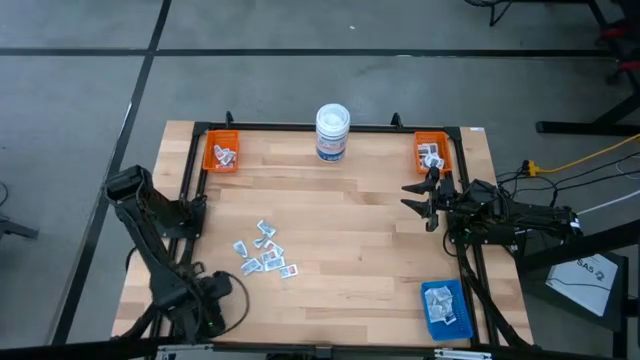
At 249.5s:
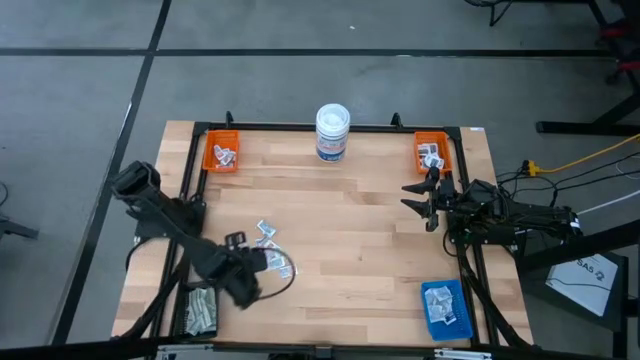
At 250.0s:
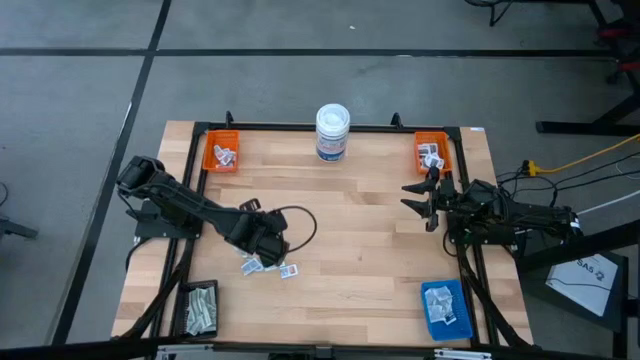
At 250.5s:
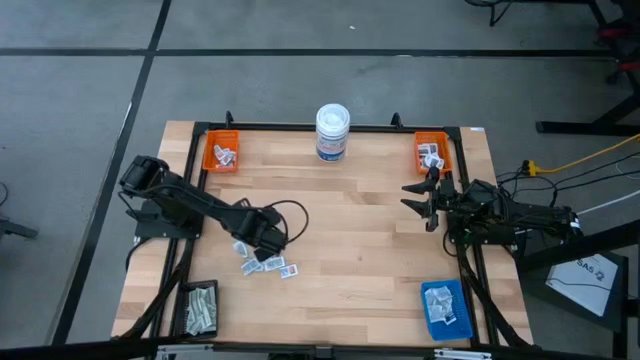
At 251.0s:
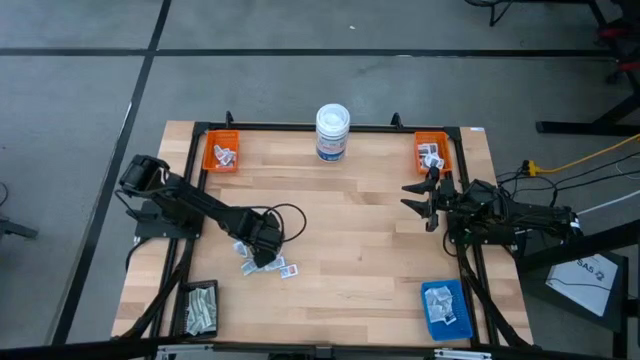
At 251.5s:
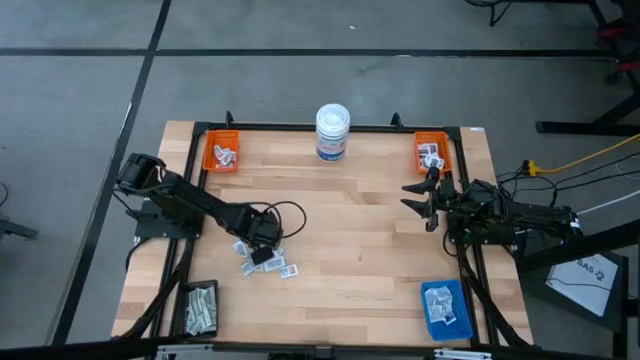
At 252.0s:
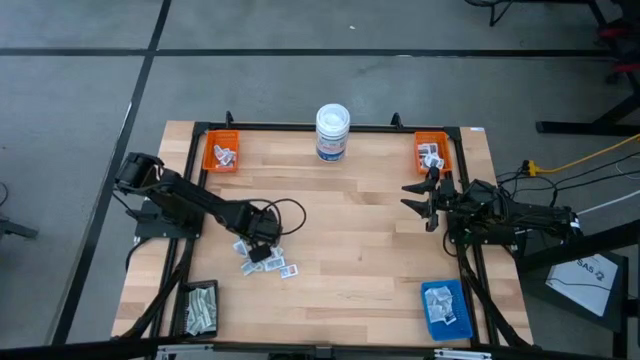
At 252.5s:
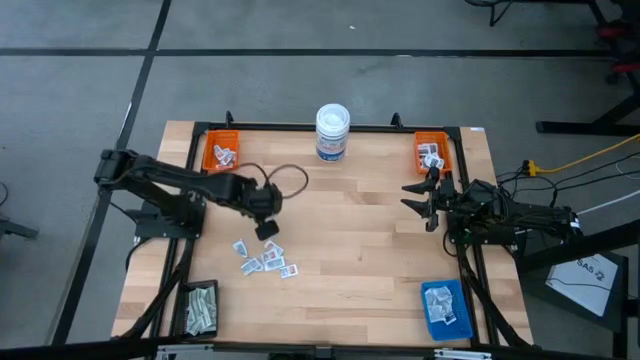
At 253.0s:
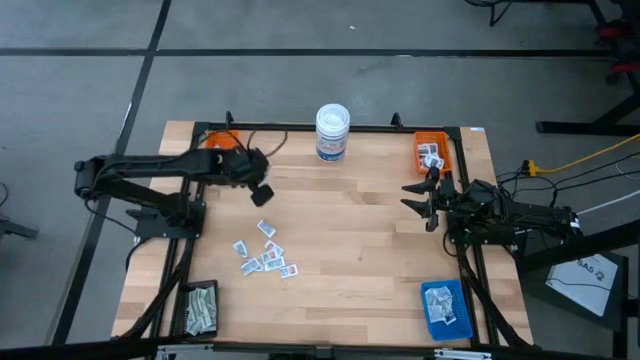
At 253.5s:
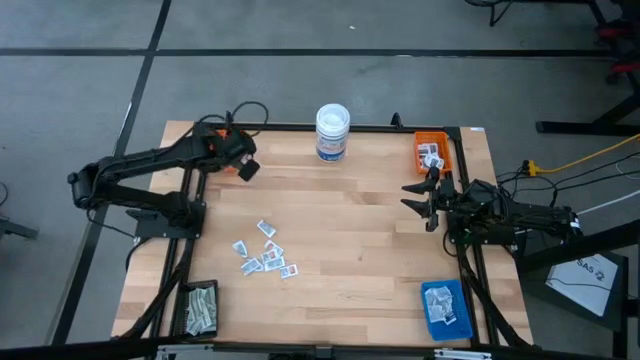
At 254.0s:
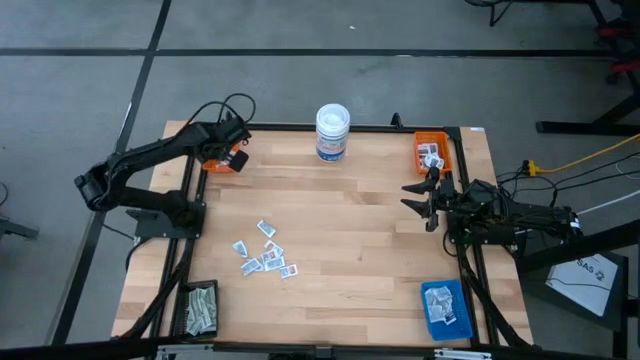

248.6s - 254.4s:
Task: Pick & Place First Aid Supplies
Put the orange ointment pack into the left orange bin

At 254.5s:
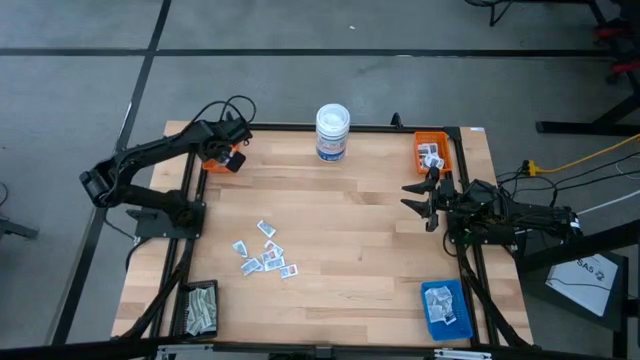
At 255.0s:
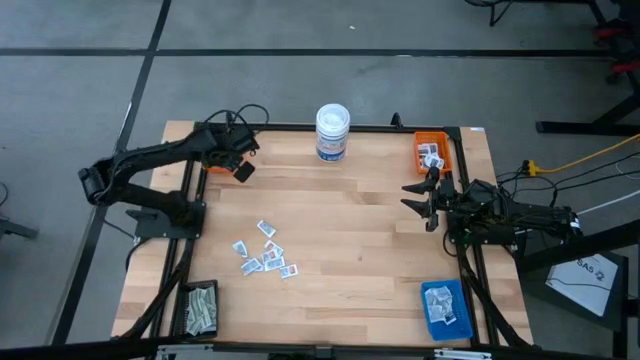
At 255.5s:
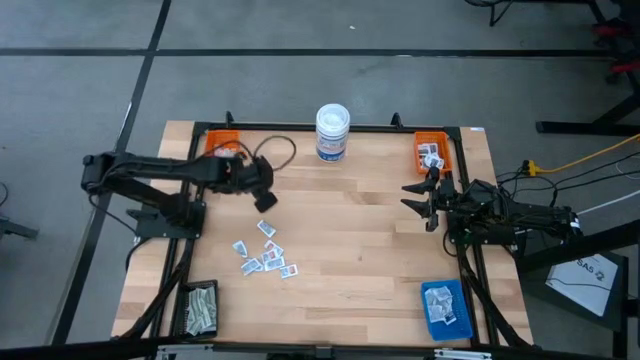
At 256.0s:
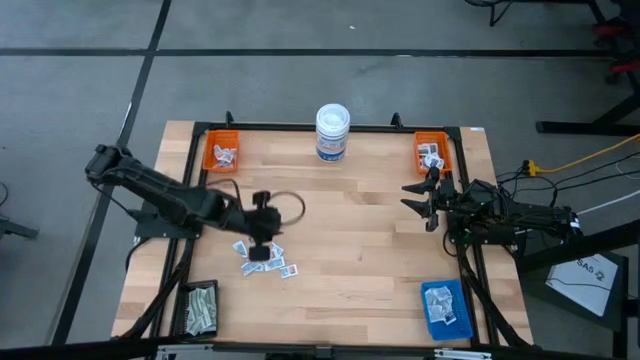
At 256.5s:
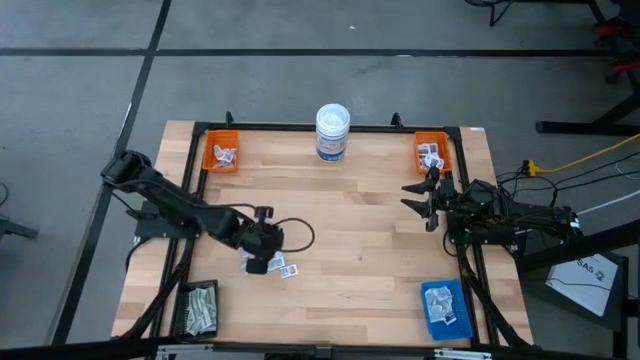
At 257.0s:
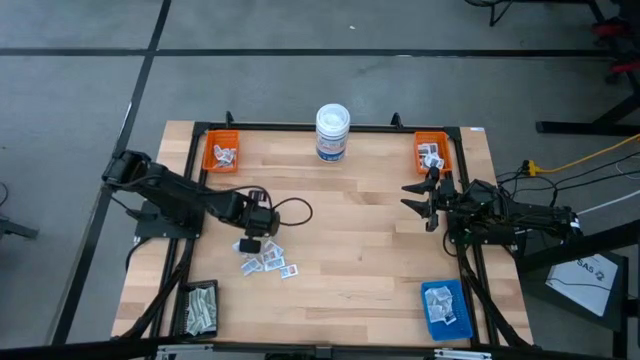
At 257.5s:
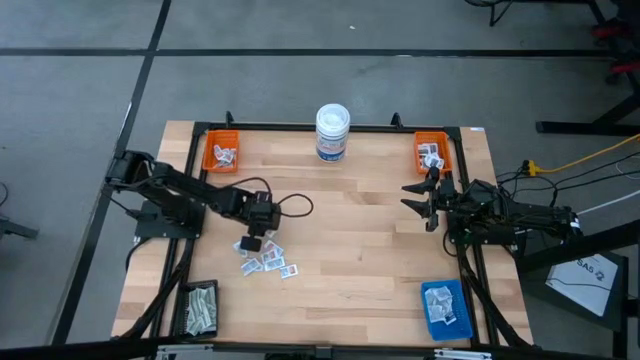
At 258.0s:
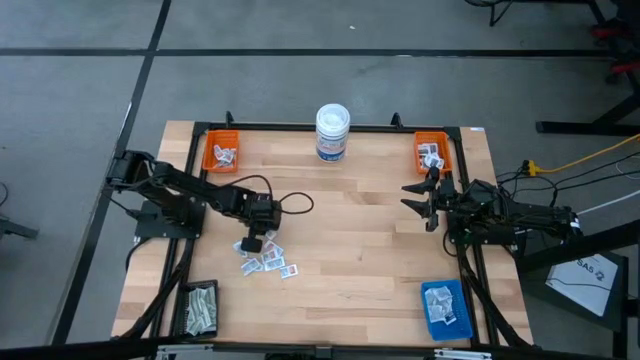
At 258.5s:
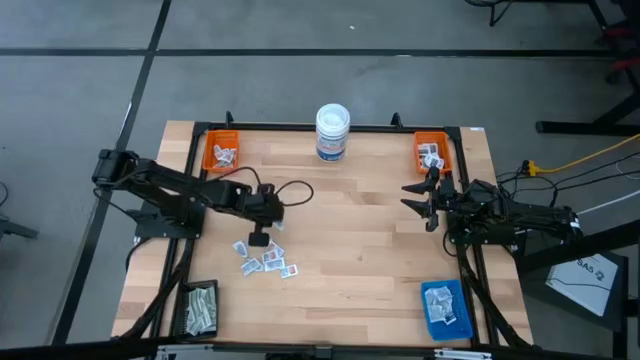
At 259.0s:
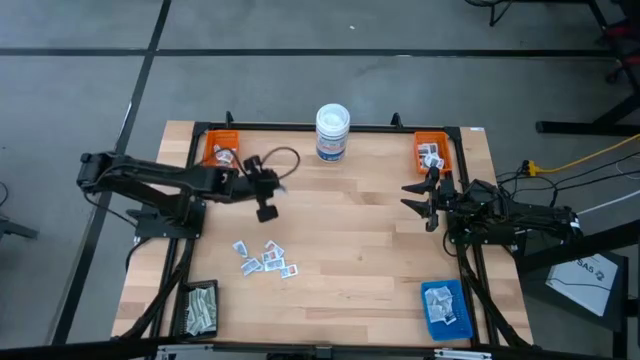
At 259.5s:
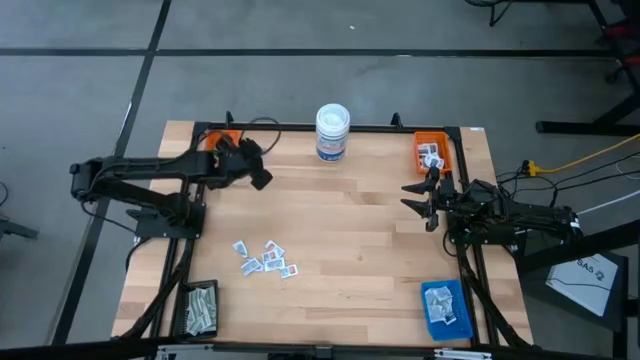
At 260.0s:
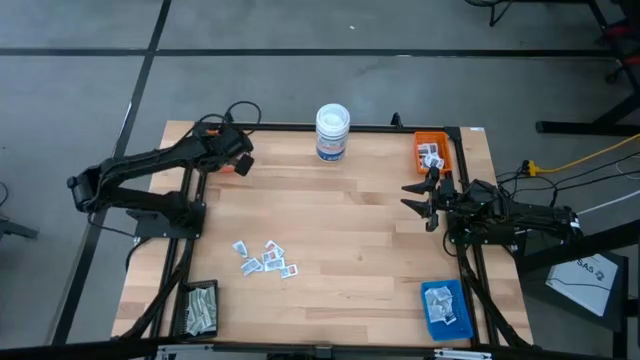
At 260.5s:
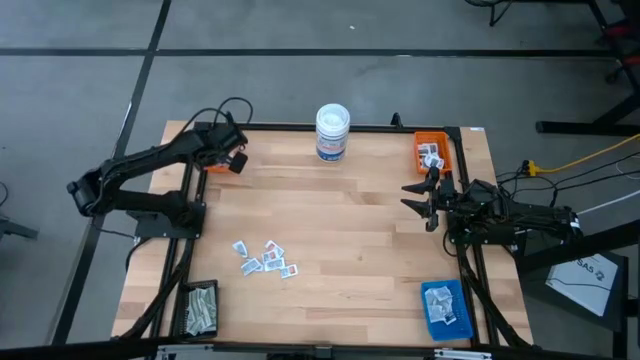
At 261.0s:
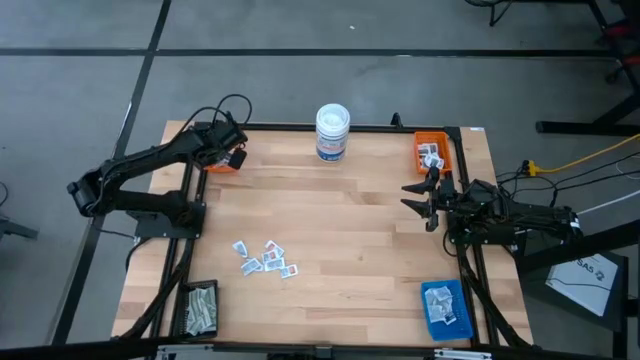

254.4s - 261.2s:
Put the orange ointment pack into the left orange bin

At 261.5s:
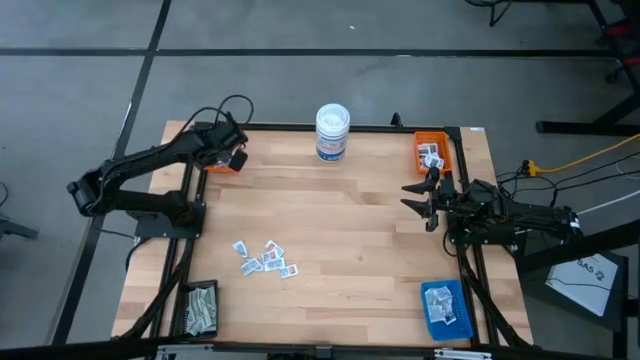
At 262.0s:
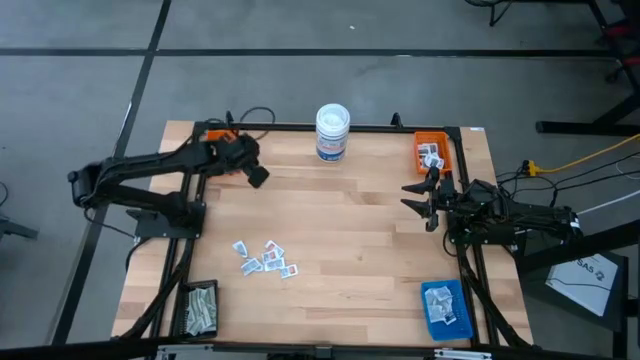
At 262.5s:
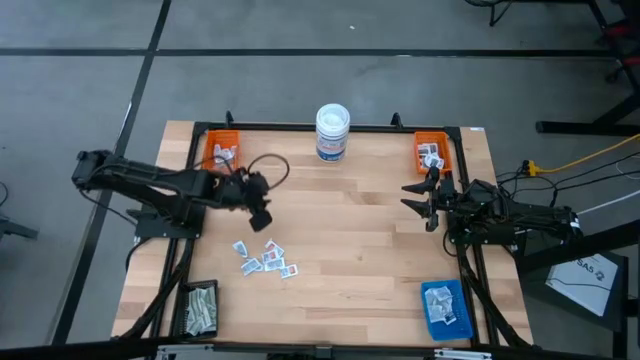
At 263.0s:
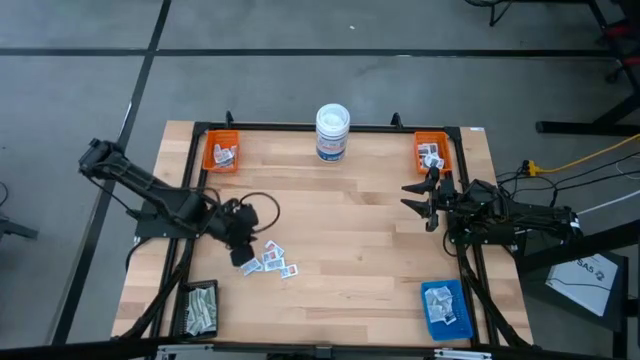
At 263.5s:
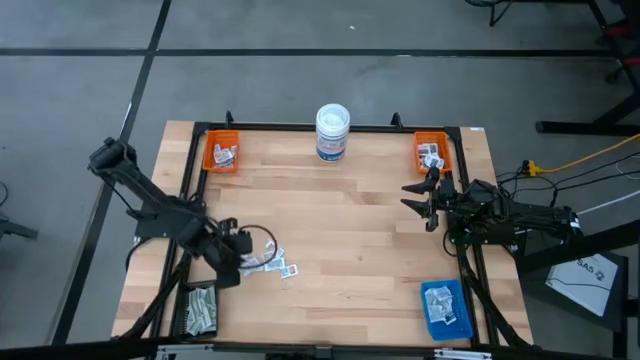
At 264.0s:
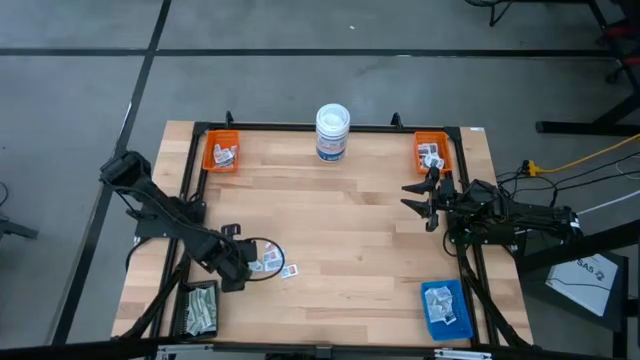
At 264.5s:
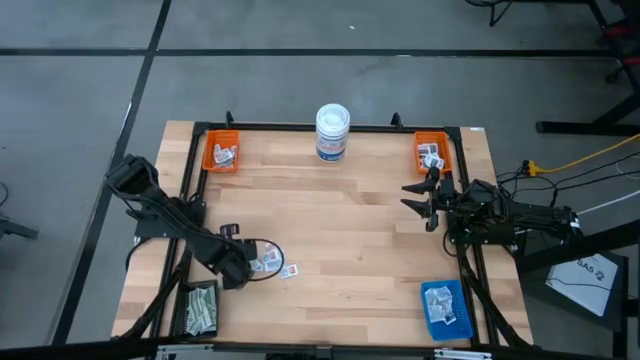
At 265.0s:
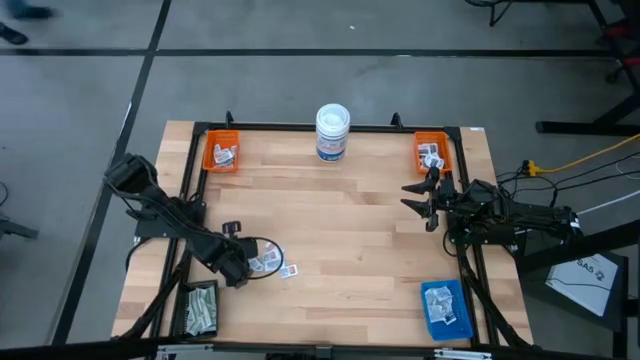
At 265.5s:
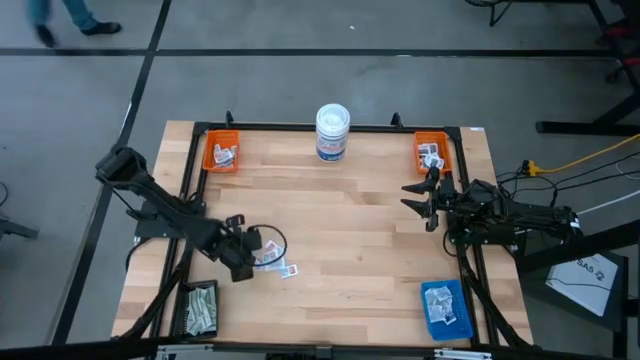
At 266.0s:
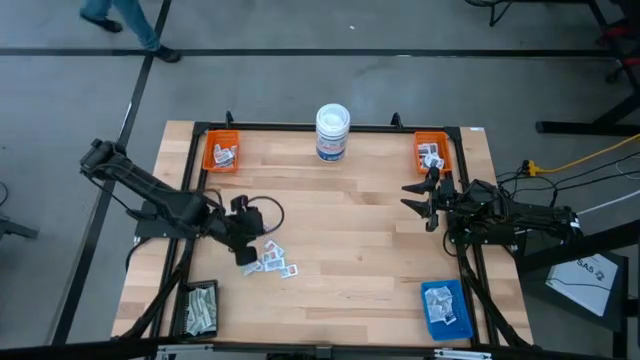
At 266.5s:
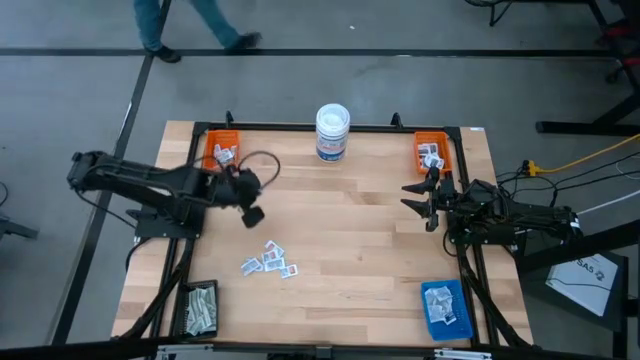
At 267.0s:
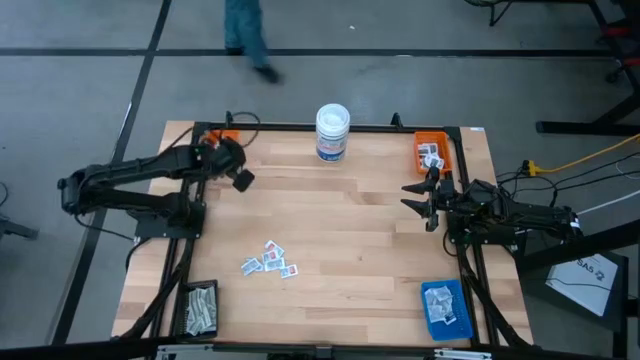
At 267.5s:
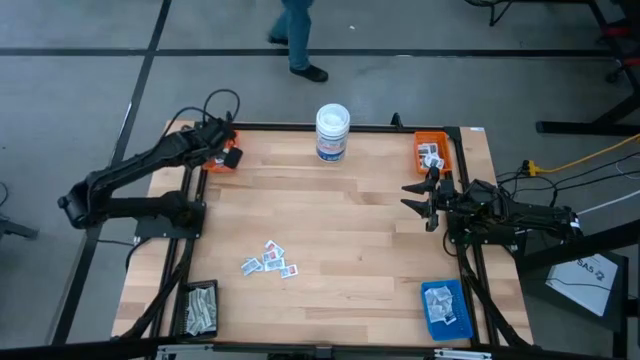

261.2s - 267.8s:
Put the orange ointment pack into the left orange bin

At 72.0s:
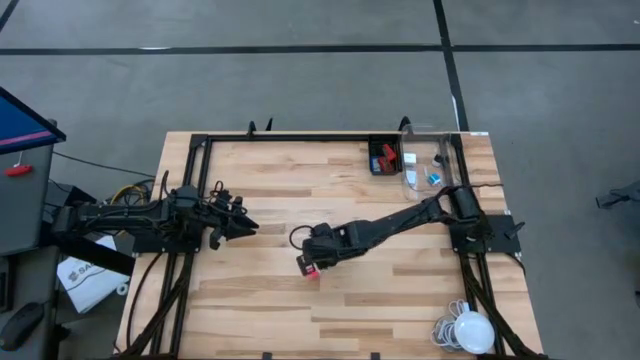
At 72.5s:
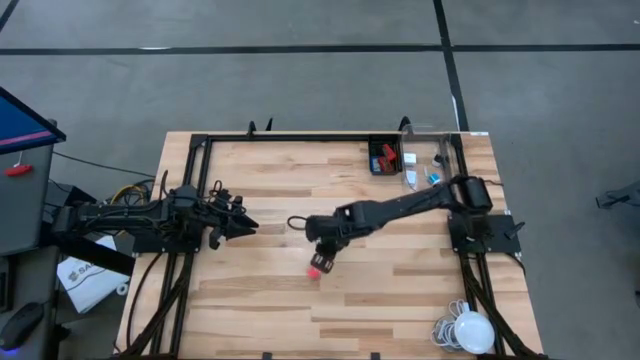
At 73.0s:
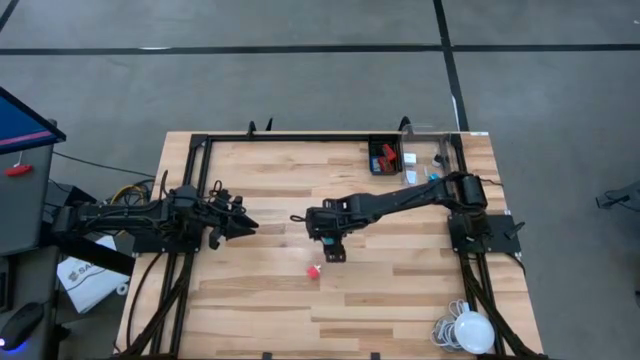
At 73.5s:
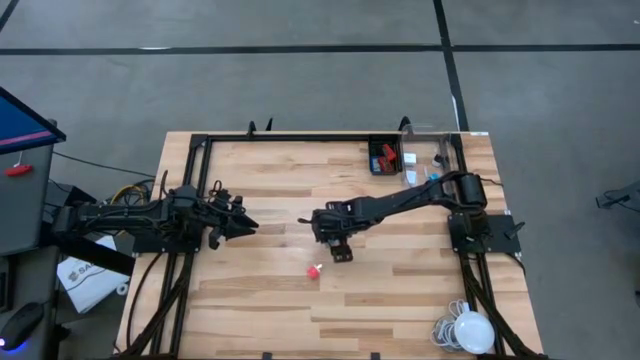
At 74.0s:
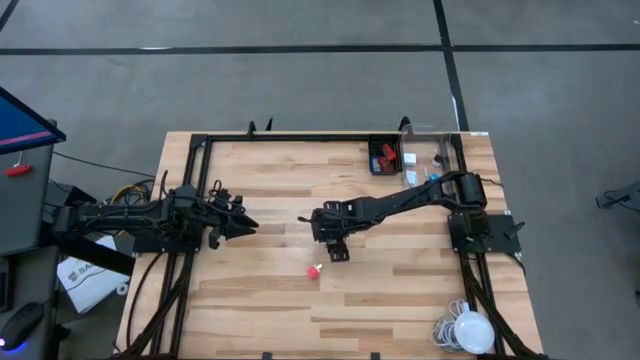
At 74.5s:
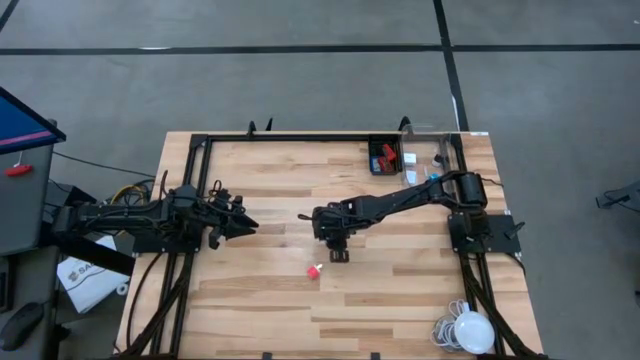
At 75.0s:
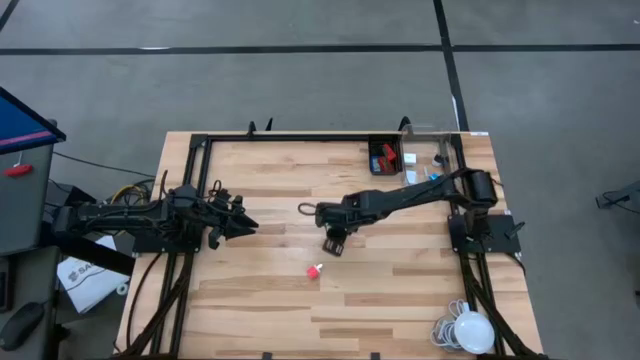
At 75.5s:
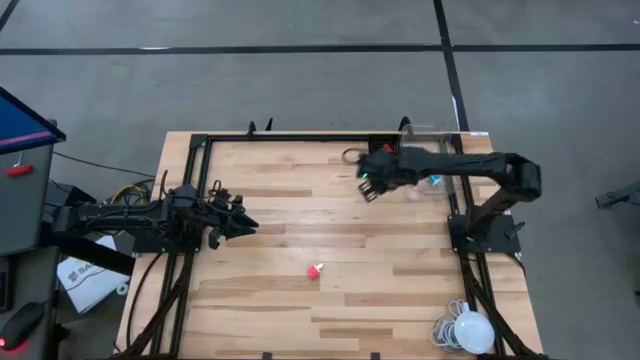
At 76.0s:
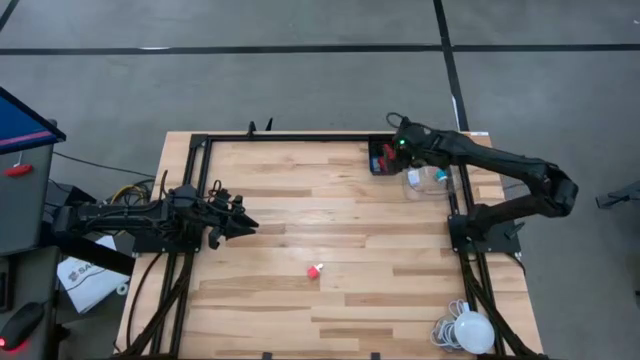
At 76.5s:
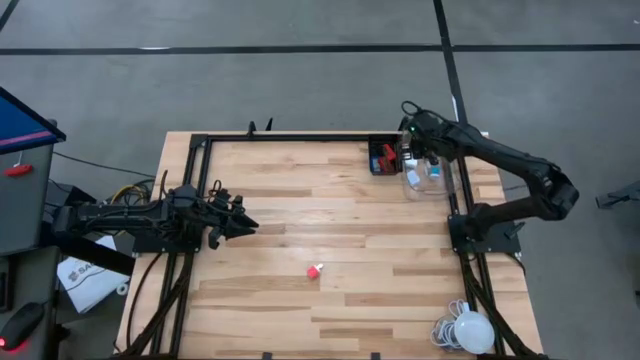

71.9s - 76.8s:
Task: Pick & Place Office items
Put the blue and white charger adapter into the transparent bin
